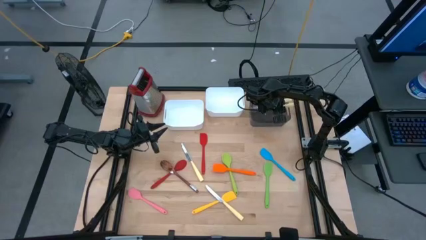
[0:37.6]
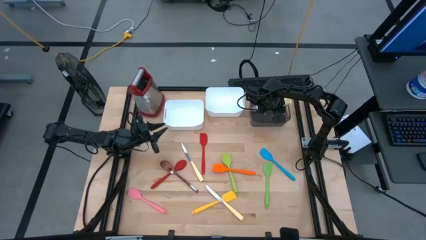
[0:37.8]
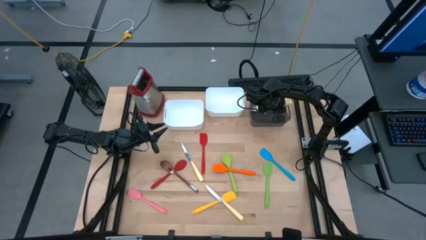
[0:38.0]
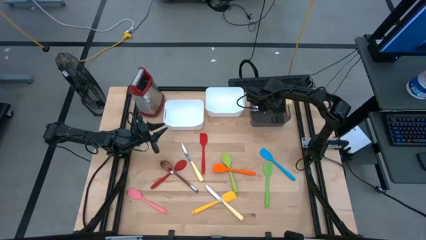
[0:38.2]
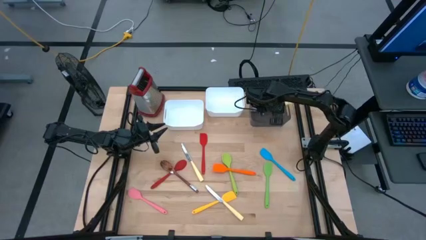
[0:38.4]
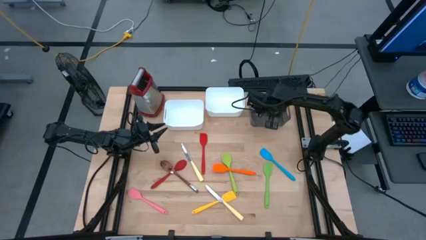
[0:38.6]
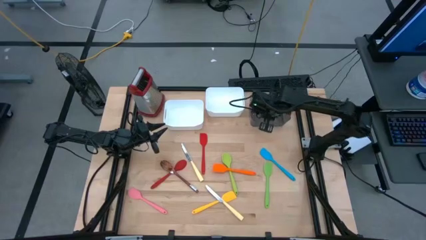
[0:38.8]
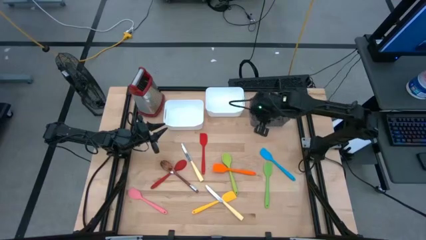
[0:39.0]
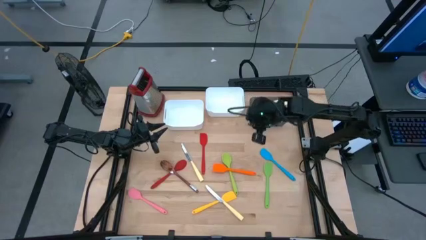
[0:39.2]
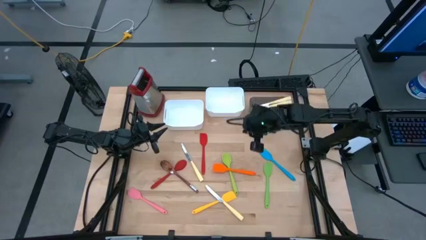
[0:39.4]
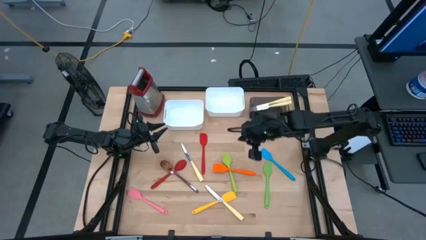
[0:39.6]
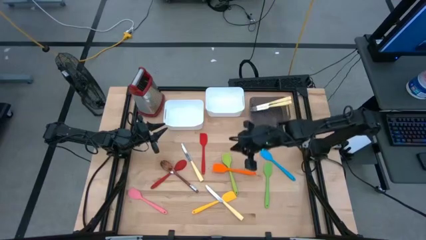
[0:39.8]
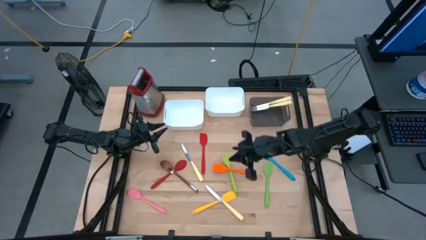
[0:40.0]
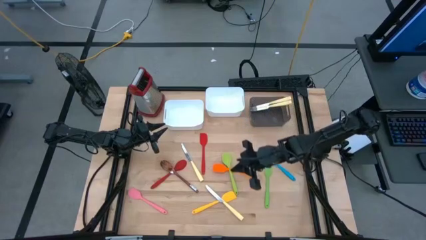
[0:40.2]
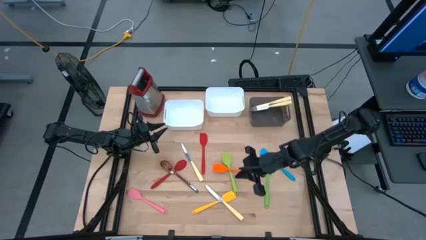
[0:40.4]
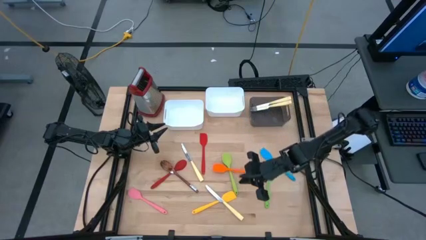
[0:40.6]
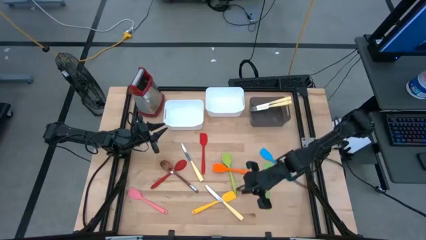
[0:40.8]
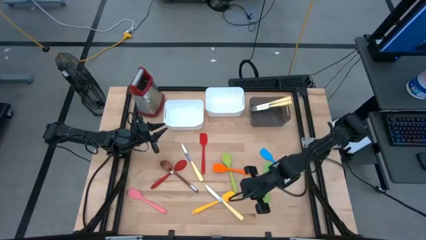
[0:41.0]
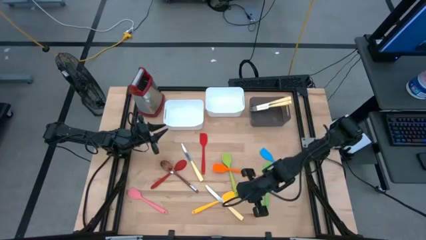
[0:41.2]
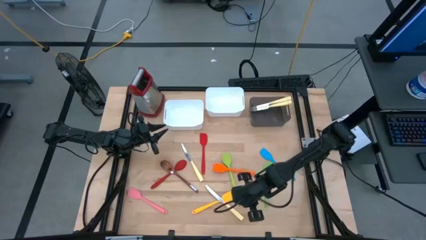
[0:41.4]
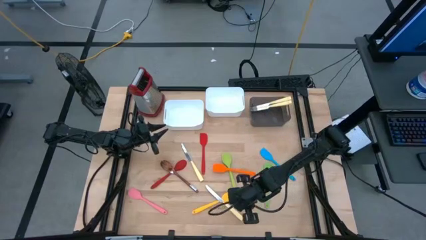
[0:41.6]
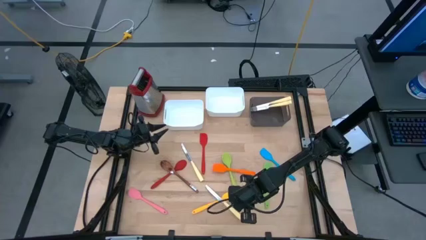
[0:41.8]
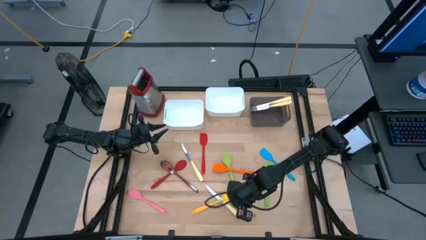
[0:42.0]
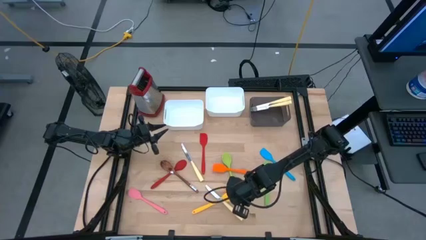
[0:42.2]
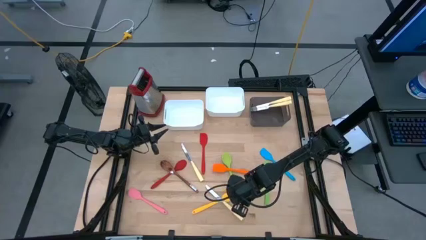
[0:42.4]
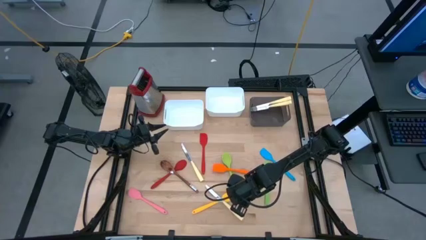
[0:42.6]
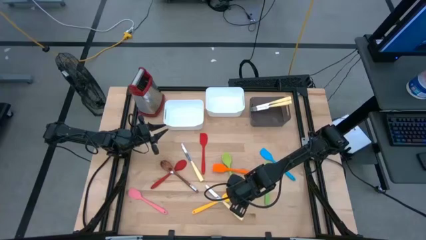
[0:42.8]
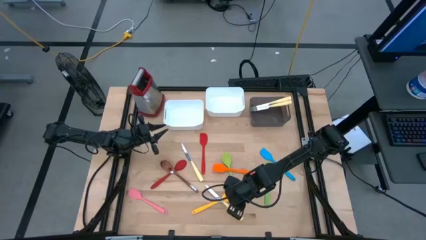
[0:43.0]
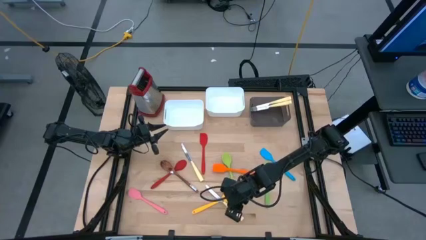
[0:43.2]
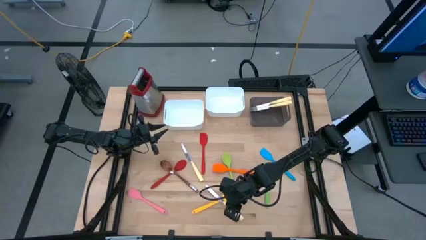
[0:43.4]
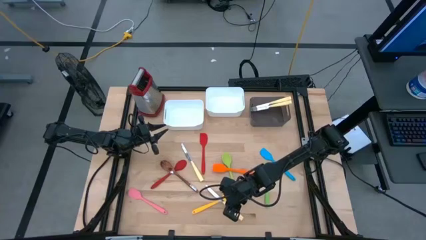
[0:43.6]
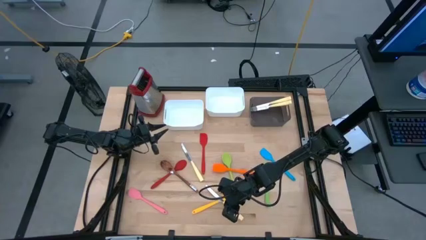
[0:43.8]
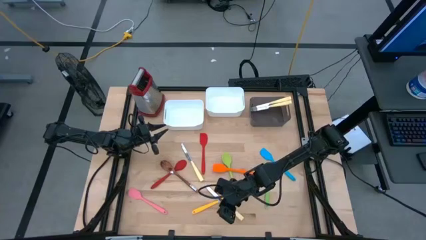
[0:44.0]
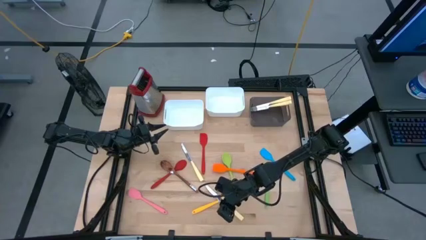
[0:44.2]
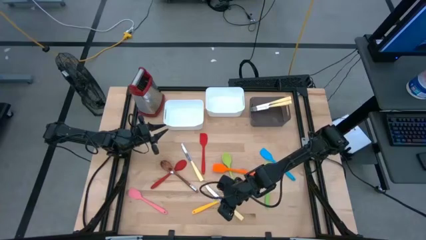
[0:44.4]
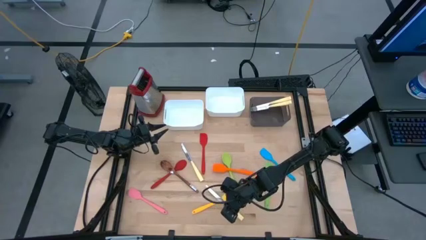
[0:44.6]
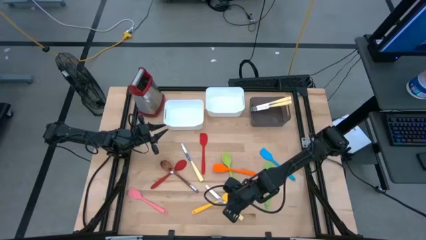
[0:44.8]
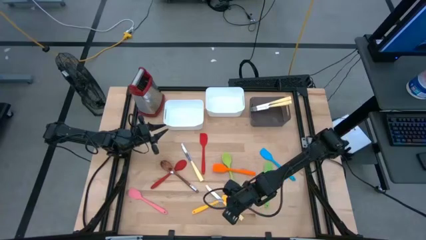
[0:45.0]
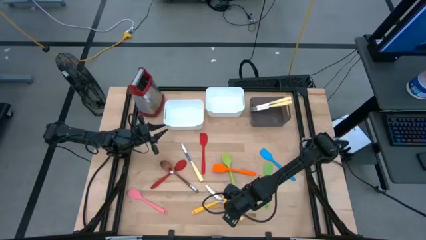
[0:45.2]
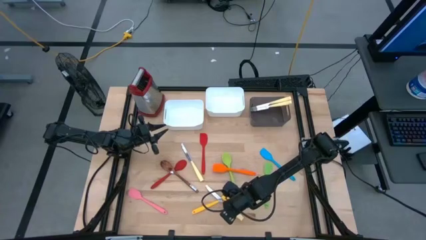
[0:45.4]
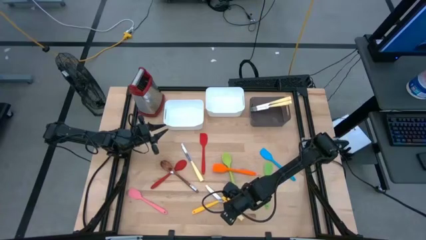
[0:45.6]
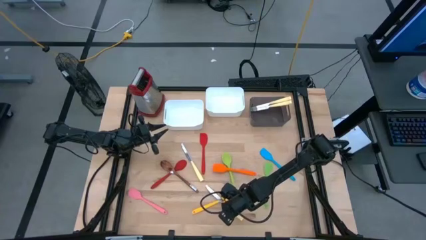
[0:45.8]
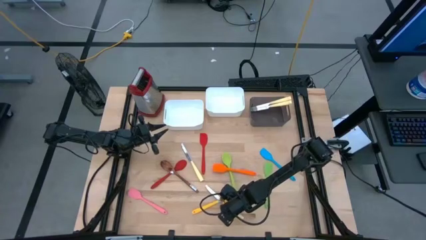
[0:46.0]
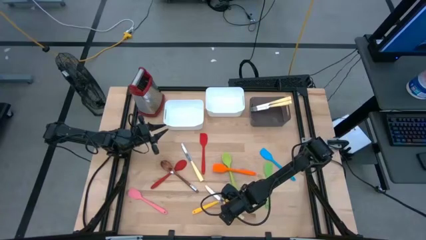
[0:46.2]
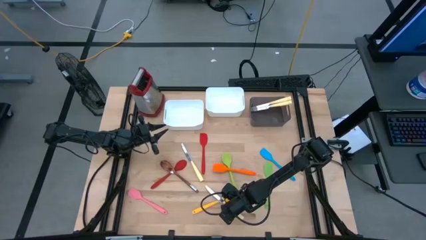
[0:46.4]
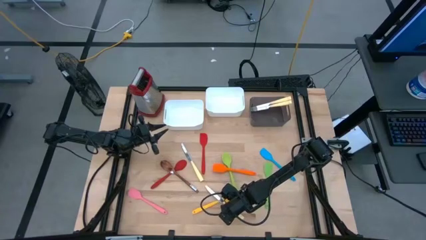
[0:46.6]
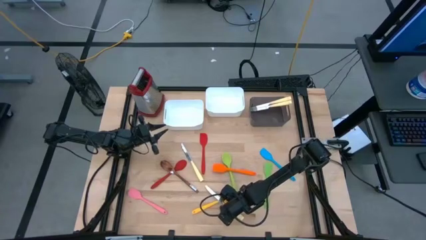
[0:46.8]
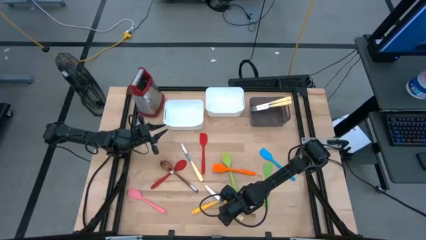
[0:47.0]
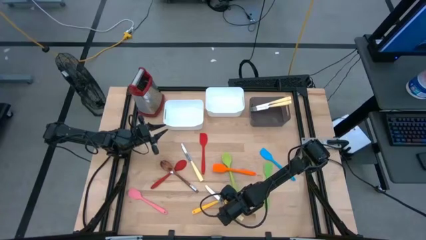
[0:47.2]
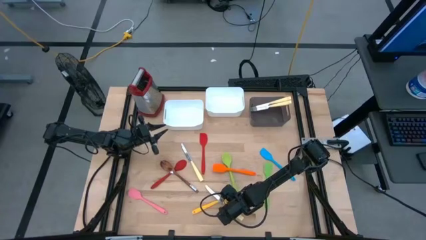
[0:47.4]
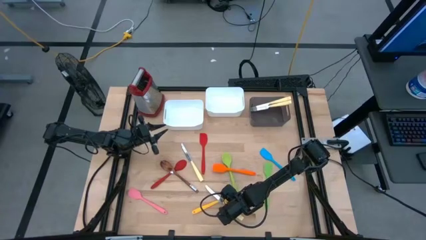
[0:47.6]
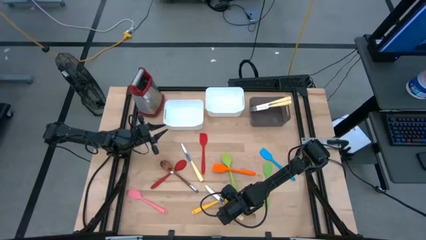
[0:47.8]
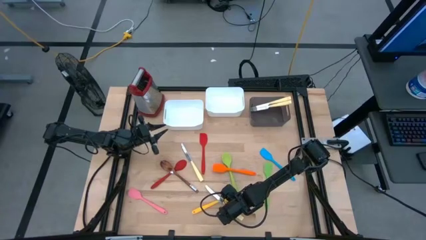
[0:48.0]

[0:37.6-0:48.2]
Task: Pick & Place Kitchen Items
Put the yellow knife into the black bin
